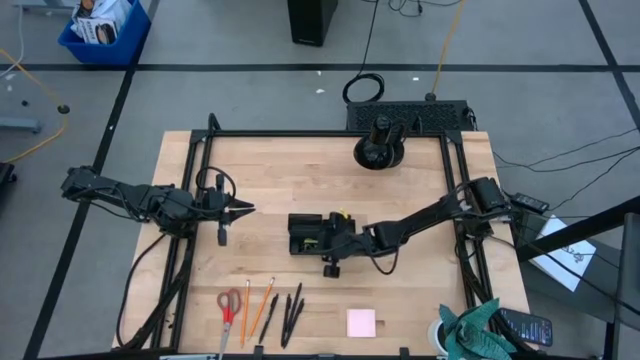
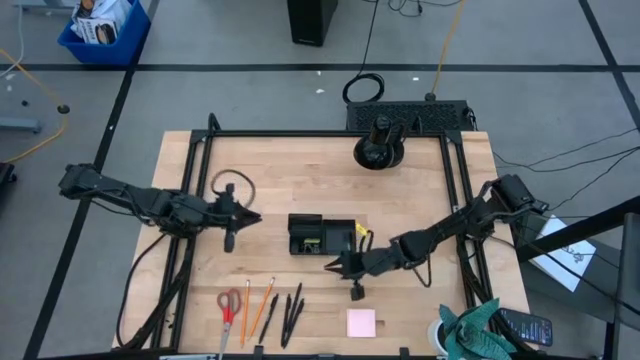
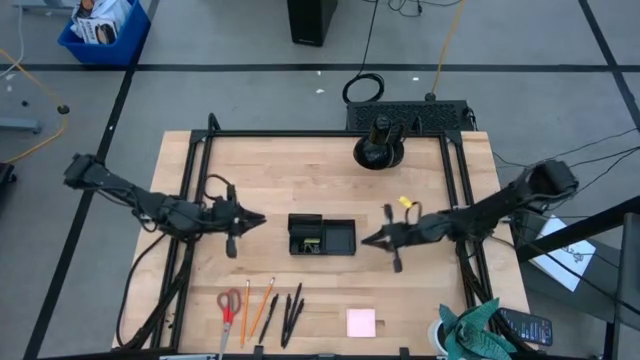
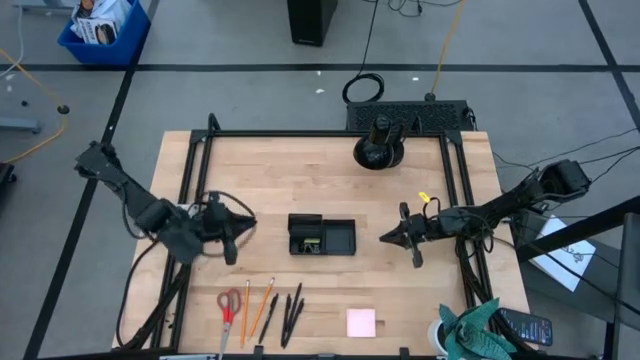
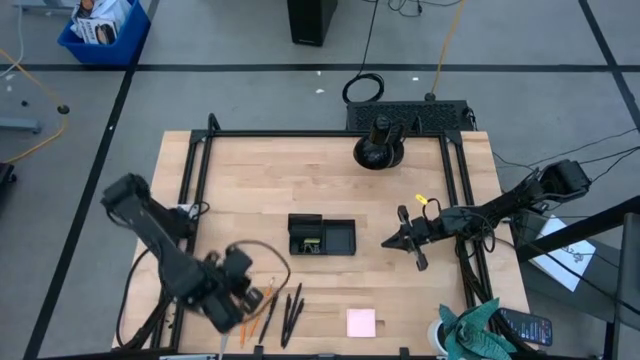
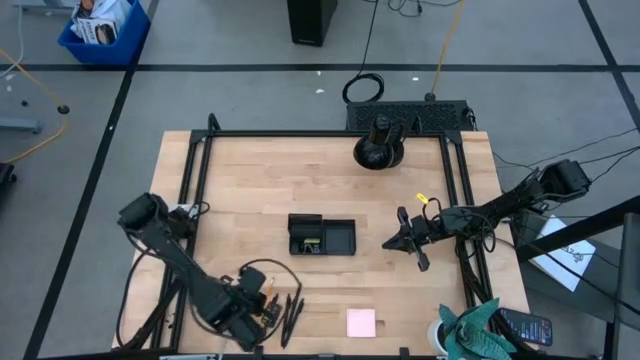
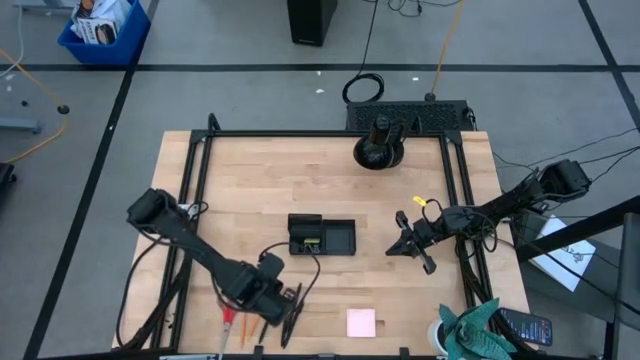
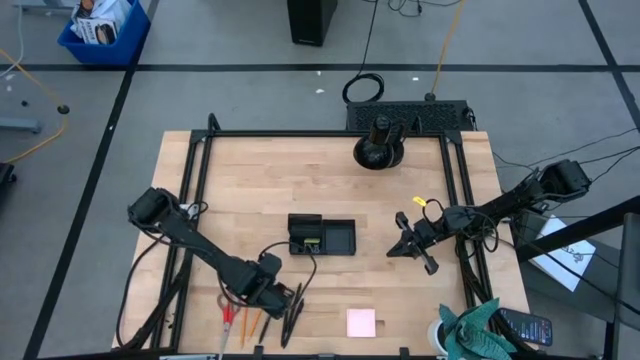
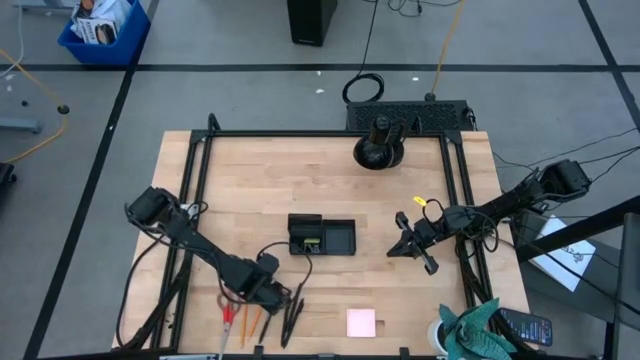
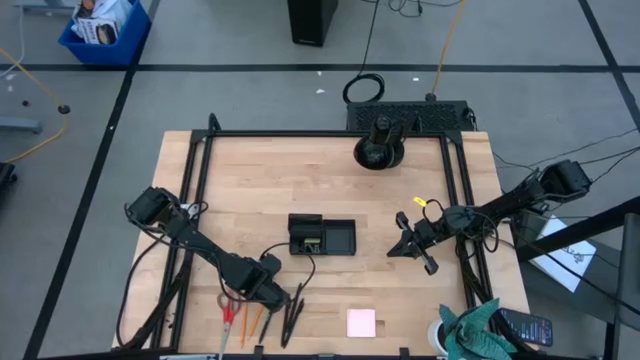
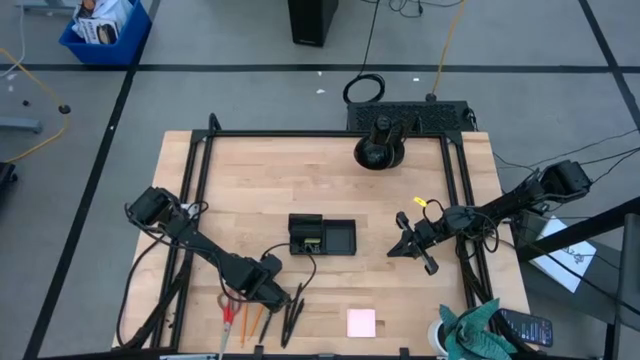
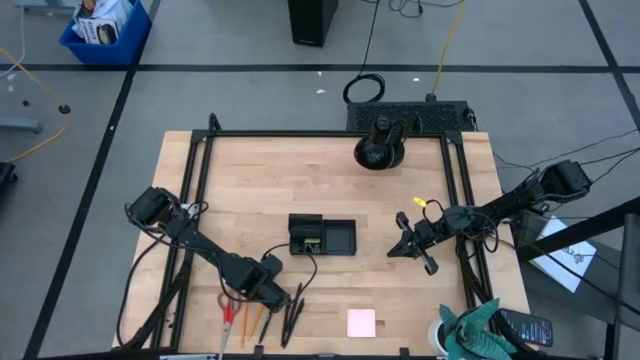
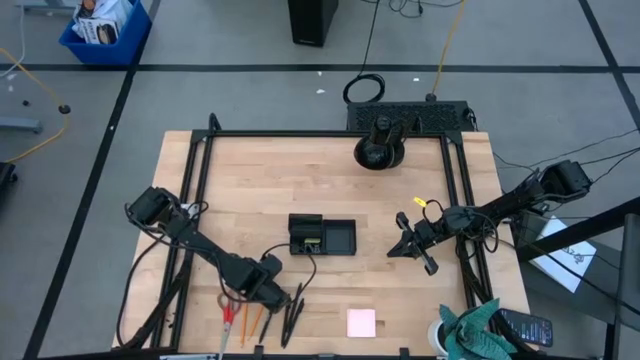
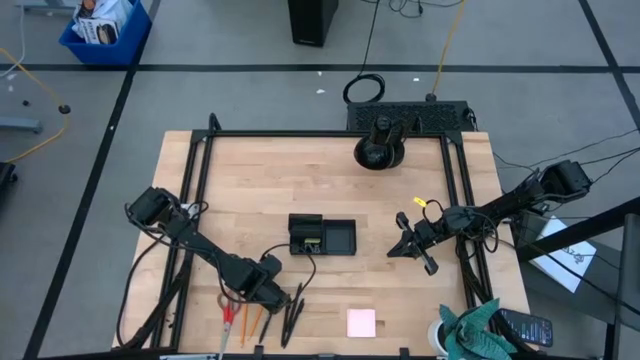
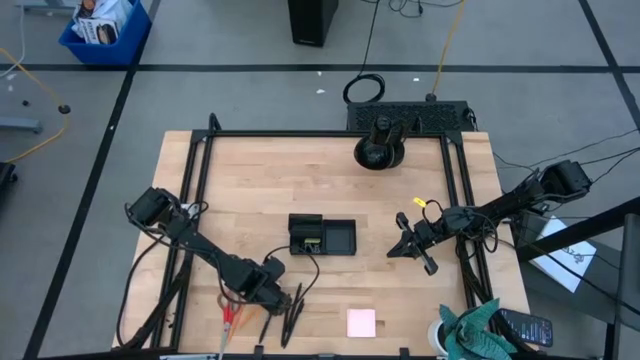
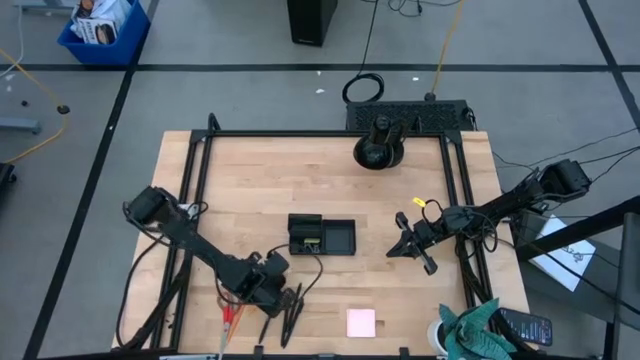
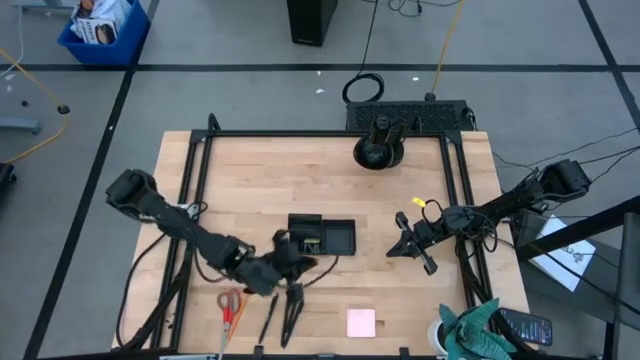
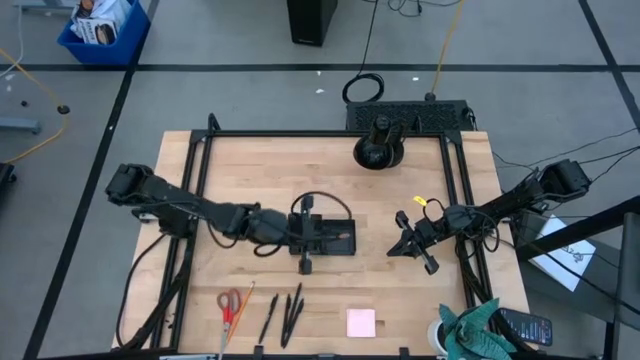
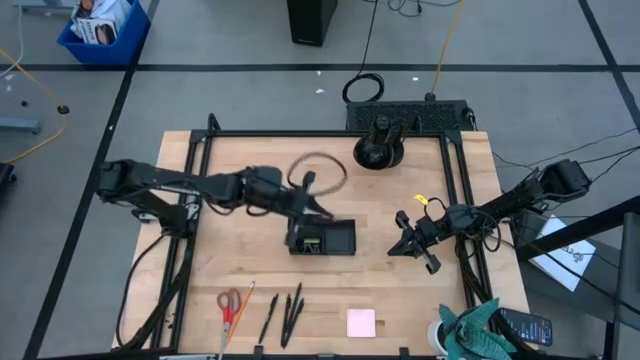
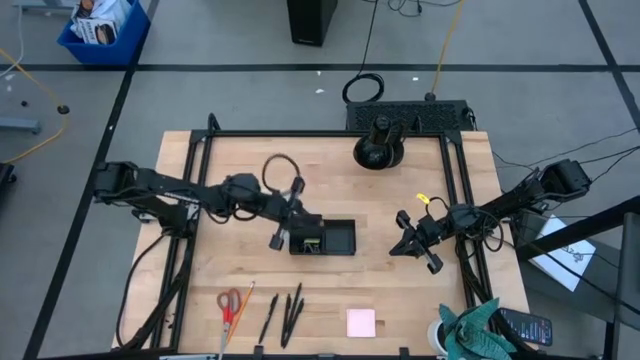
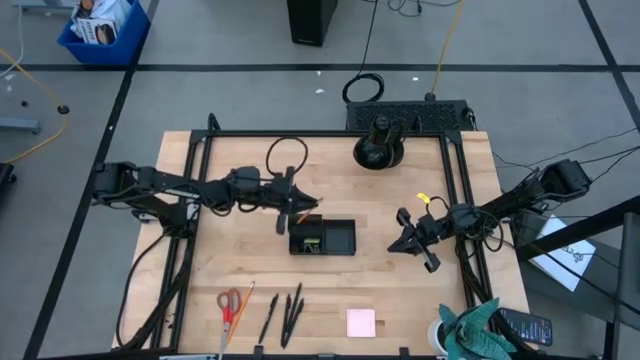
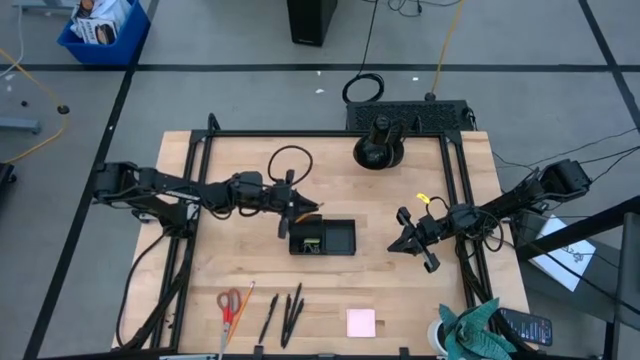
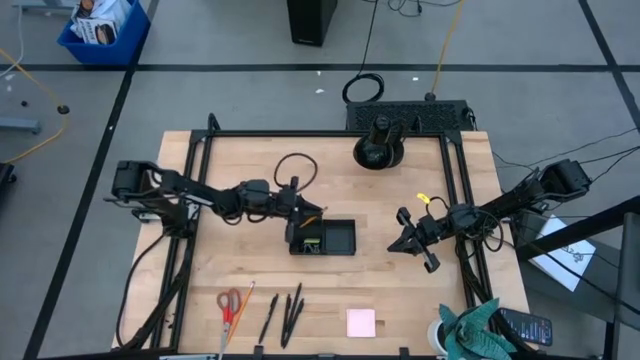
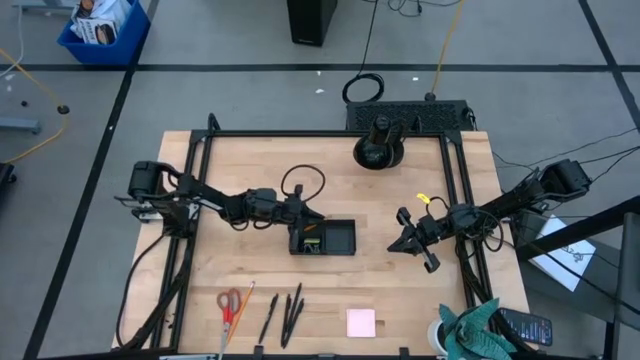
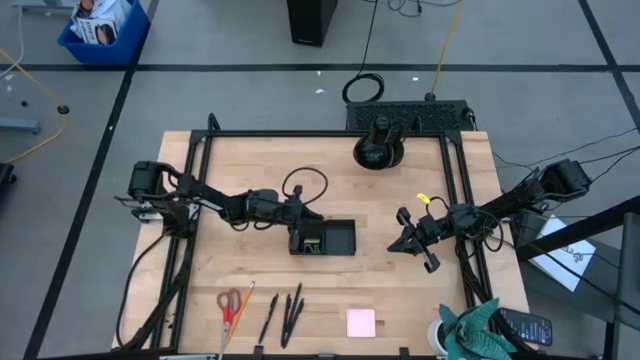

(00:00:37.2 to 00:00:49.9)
Task: Pick and place office supplies into organizer
Put the yellow pencil into the black desk organizer

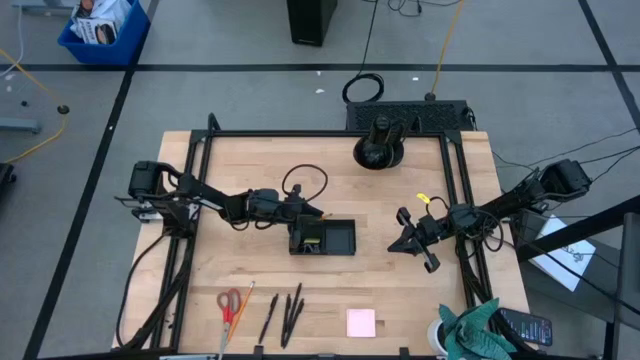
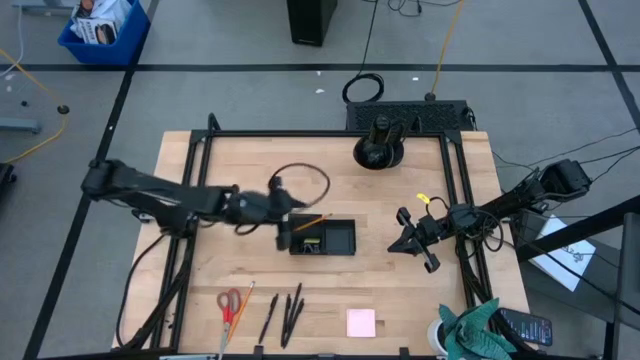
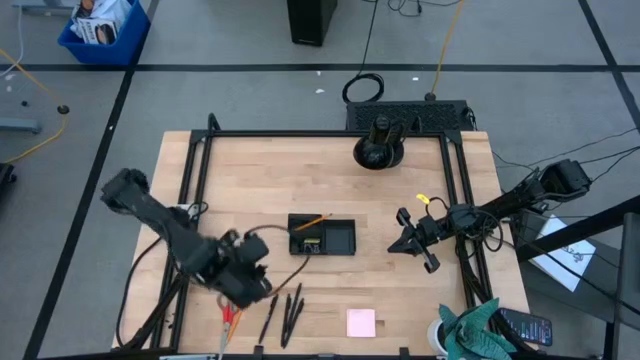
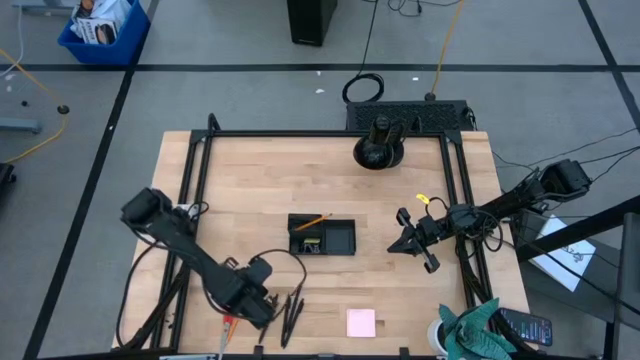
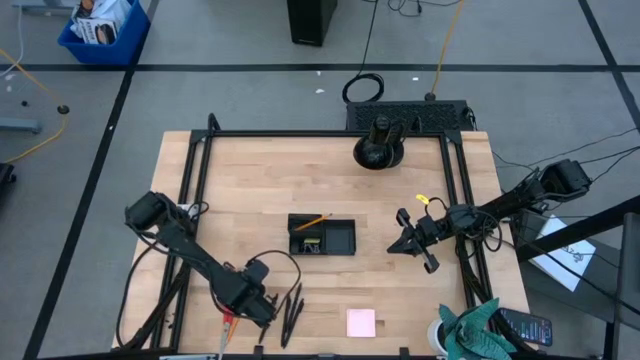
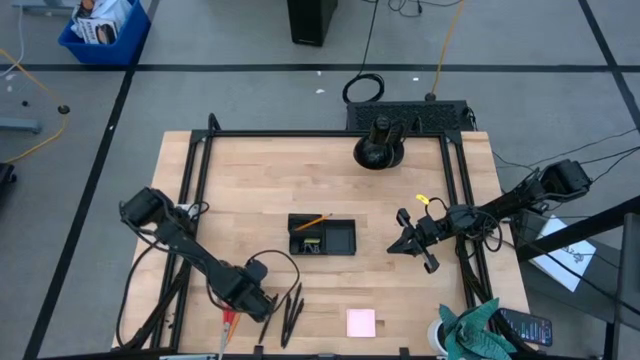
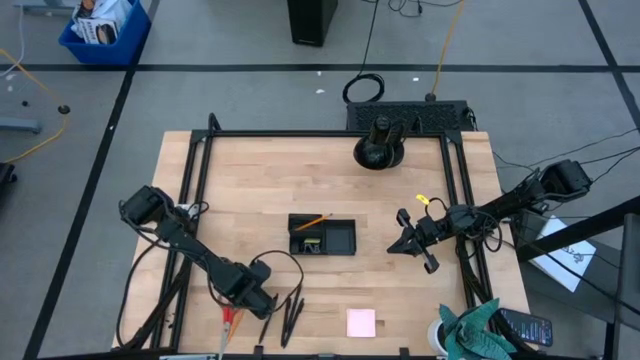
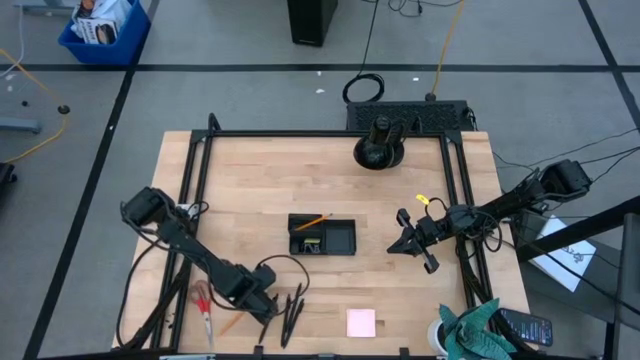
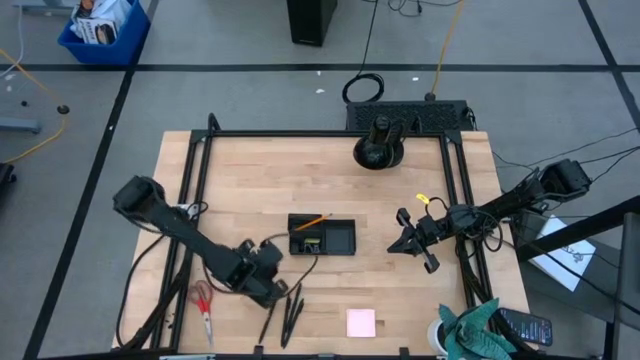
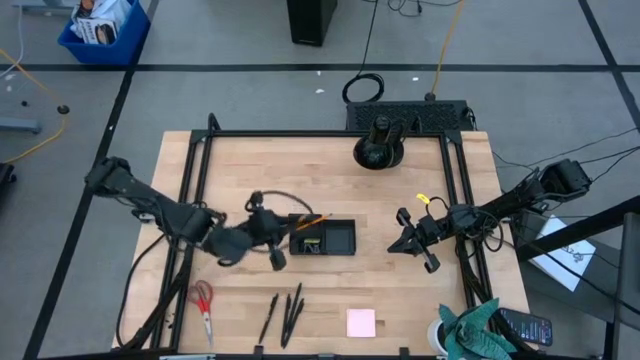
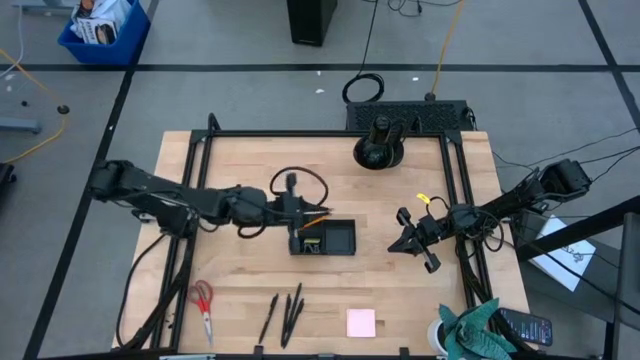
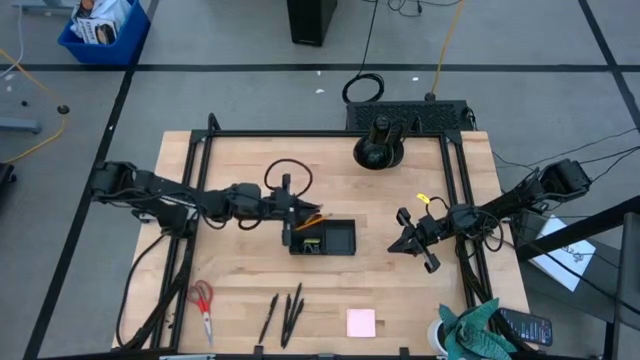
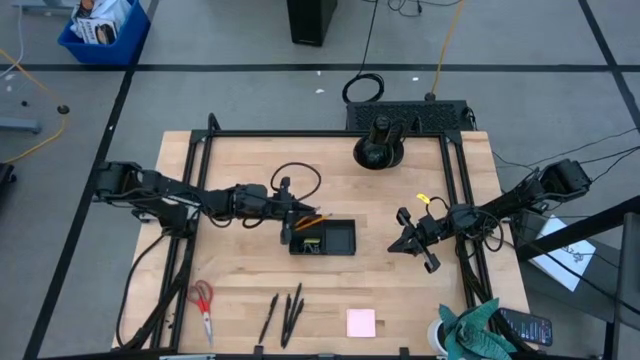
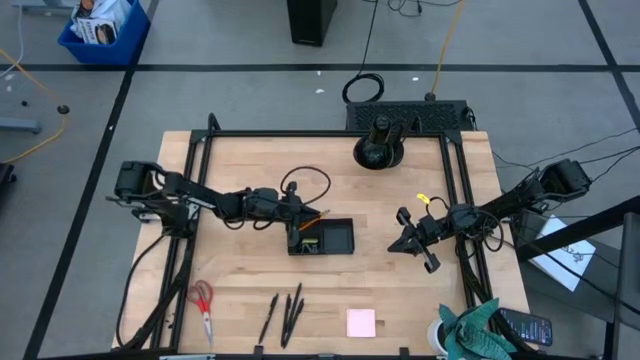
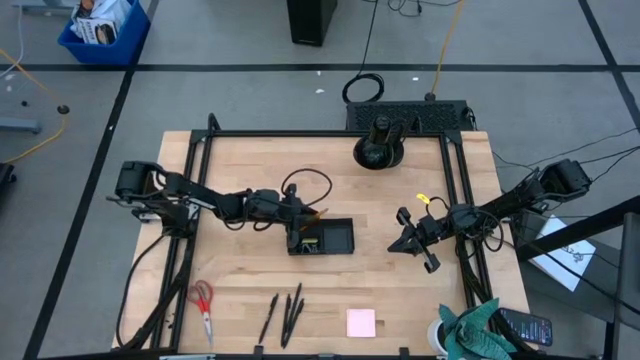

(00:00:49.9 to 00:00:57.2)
Put the yellow pencil into the black desk organizer

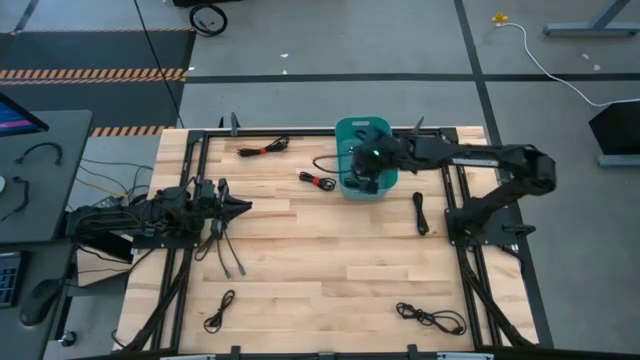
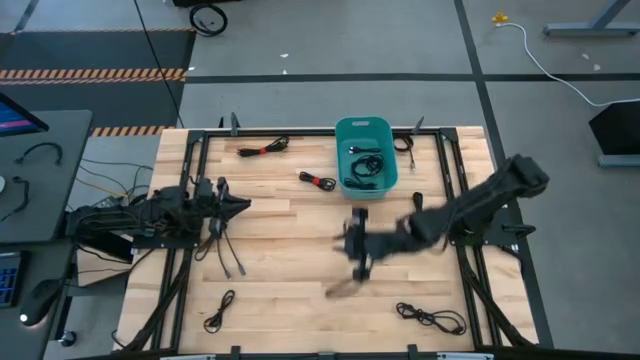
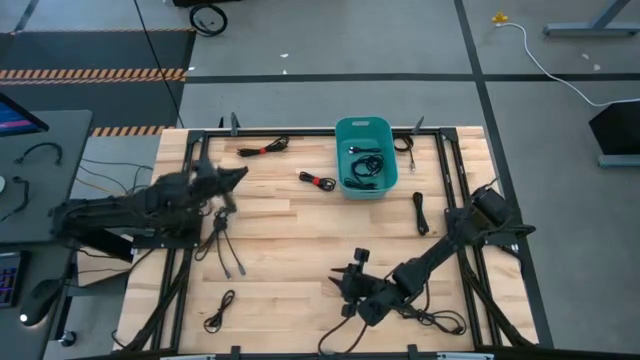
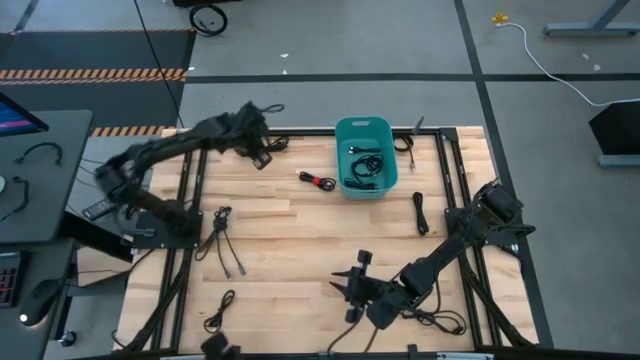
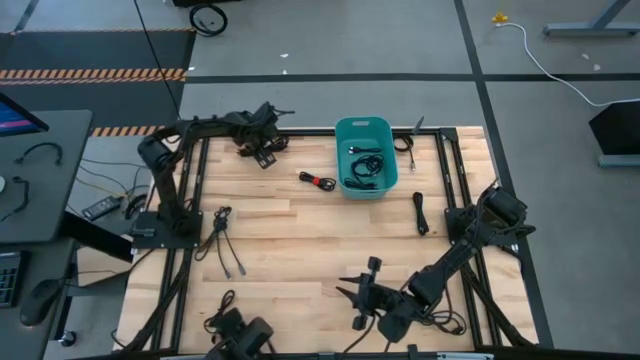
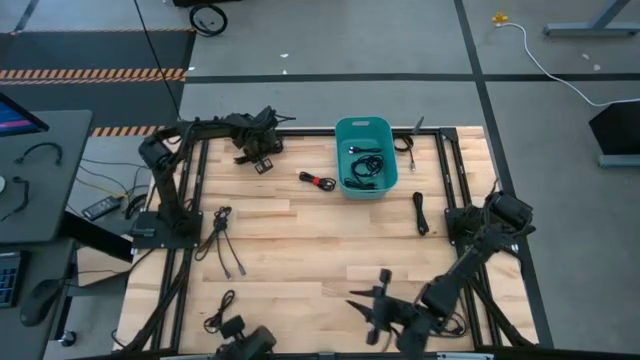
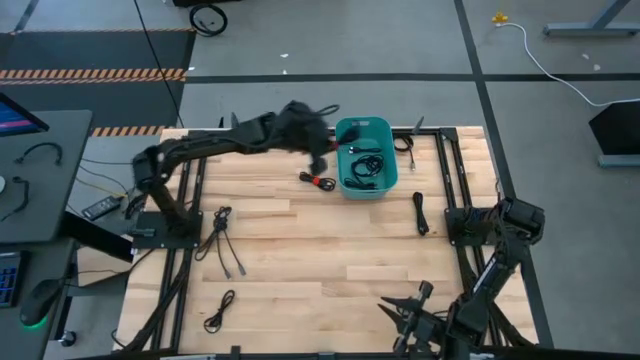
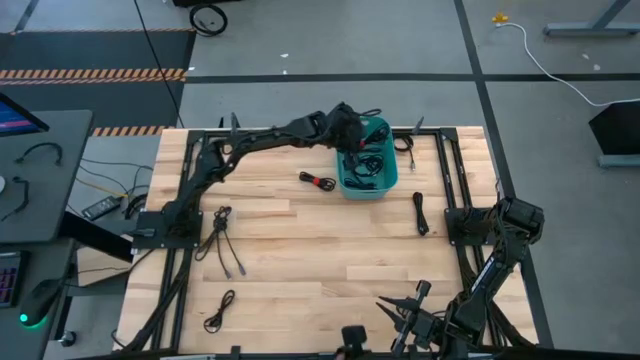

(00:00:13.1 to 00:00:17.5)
Task: Pick and place USB-C Cables
Put the black charger cable into the green bin
